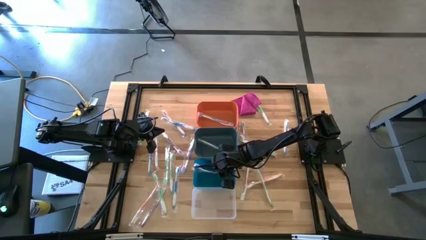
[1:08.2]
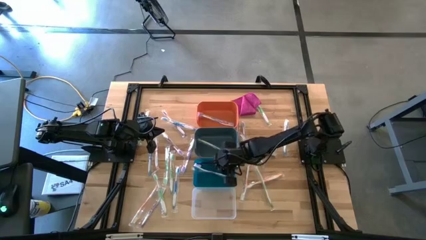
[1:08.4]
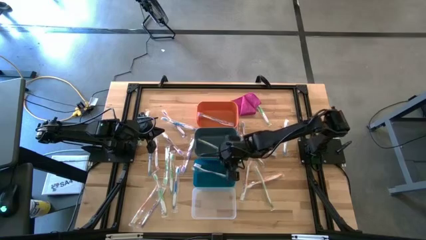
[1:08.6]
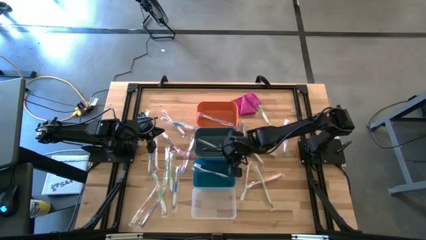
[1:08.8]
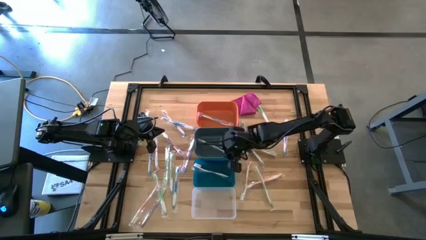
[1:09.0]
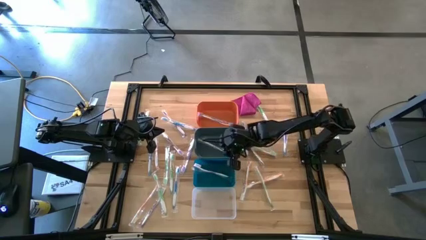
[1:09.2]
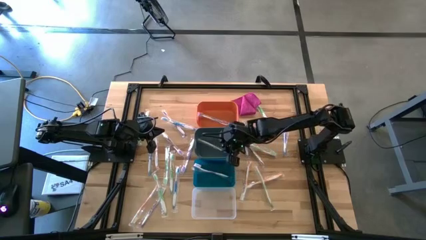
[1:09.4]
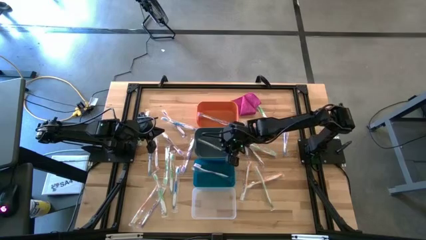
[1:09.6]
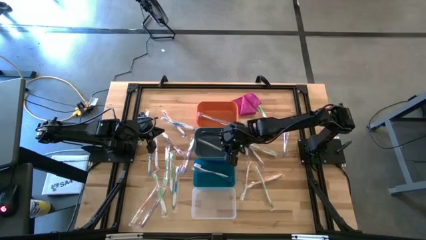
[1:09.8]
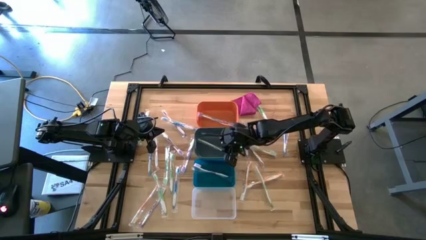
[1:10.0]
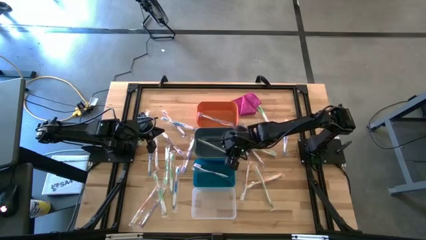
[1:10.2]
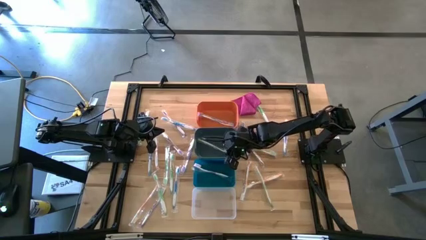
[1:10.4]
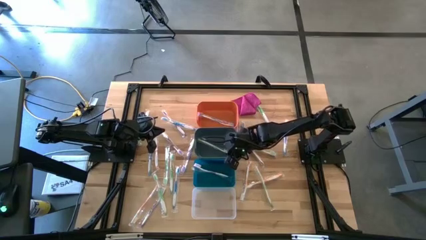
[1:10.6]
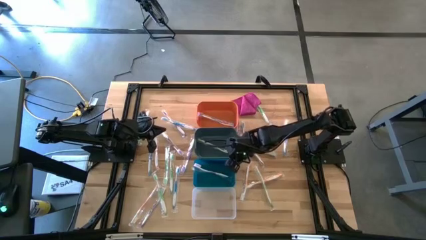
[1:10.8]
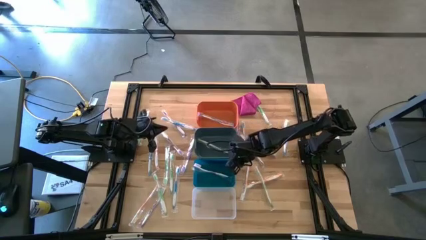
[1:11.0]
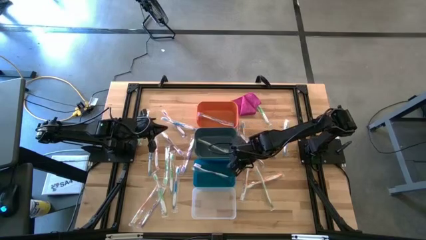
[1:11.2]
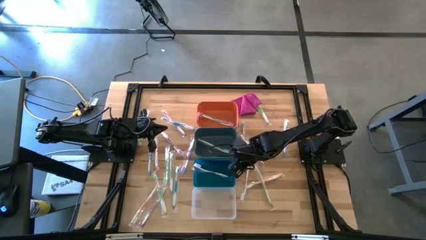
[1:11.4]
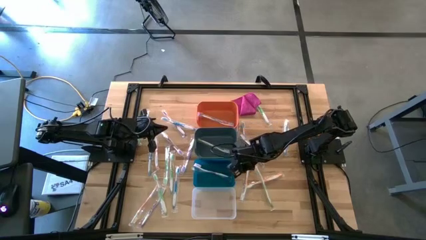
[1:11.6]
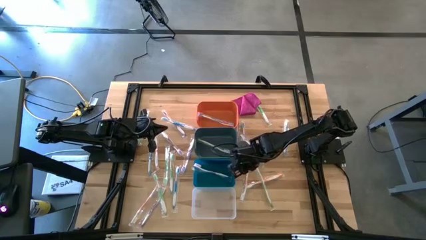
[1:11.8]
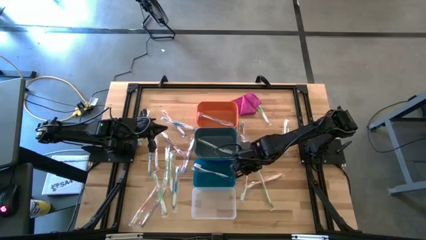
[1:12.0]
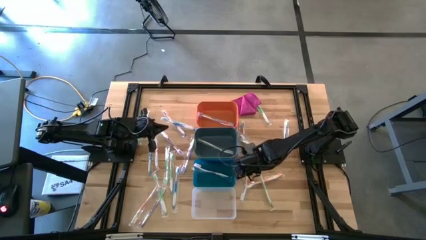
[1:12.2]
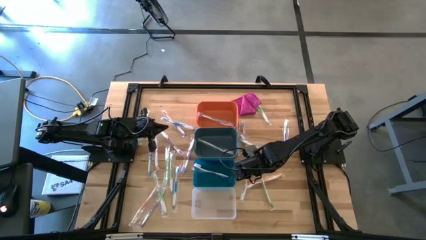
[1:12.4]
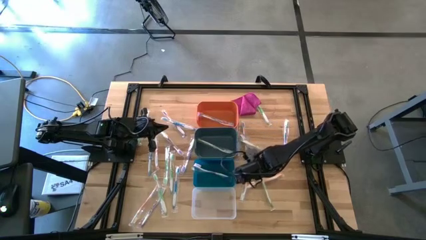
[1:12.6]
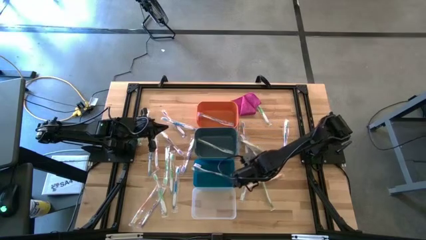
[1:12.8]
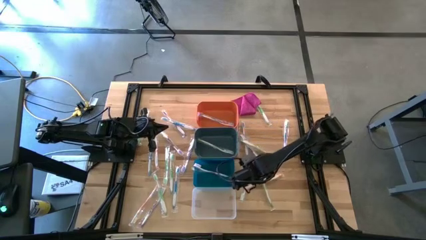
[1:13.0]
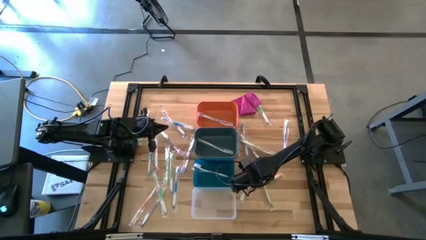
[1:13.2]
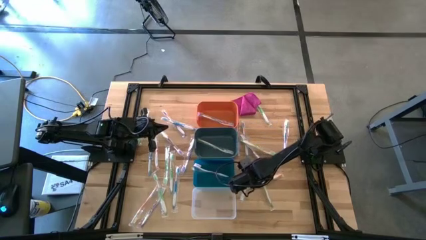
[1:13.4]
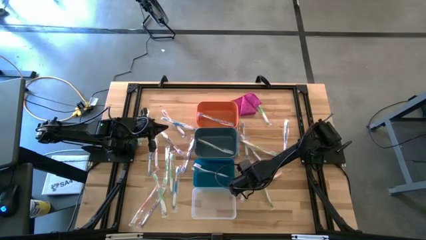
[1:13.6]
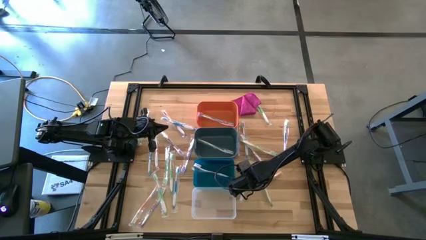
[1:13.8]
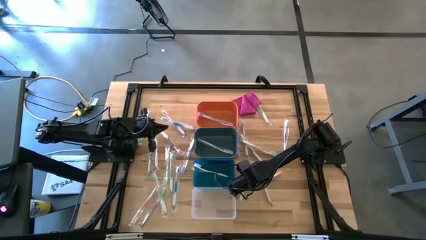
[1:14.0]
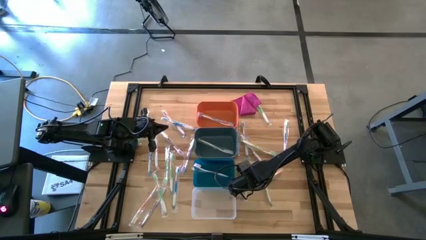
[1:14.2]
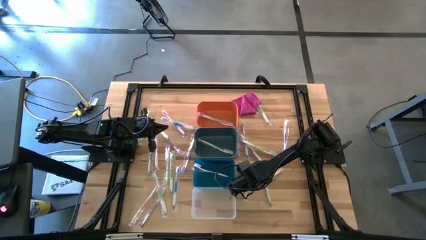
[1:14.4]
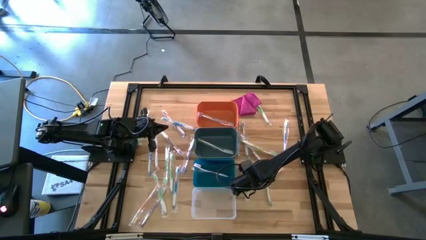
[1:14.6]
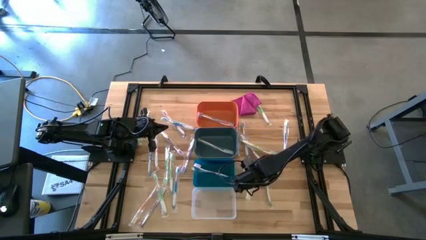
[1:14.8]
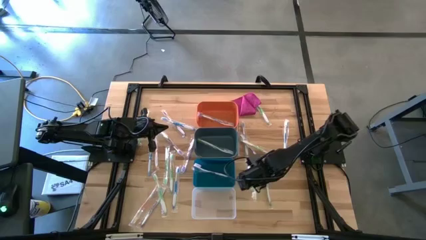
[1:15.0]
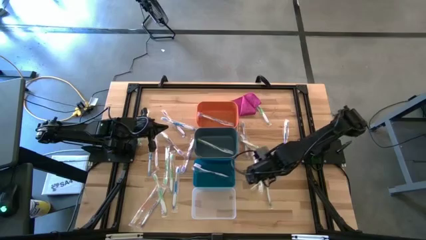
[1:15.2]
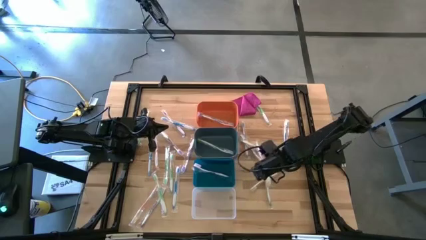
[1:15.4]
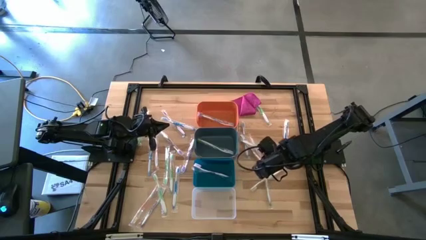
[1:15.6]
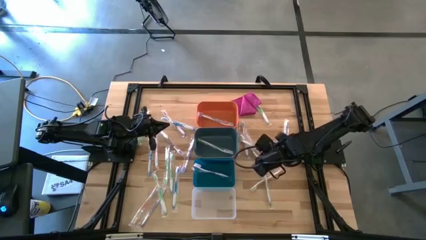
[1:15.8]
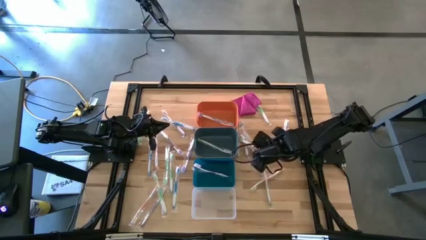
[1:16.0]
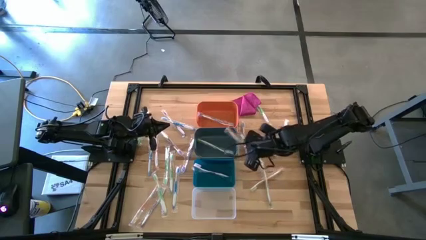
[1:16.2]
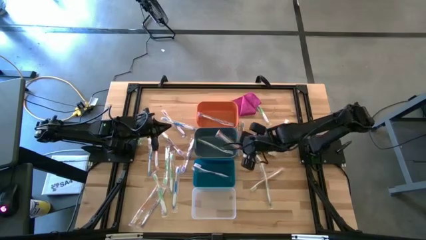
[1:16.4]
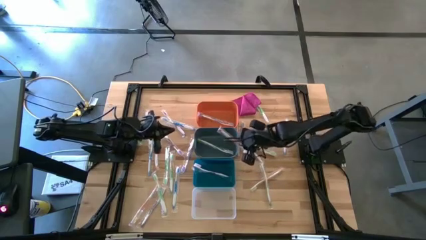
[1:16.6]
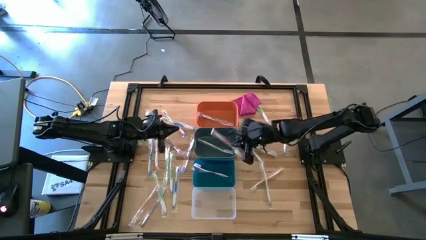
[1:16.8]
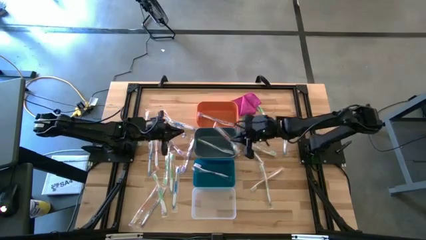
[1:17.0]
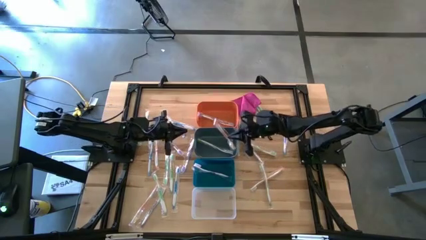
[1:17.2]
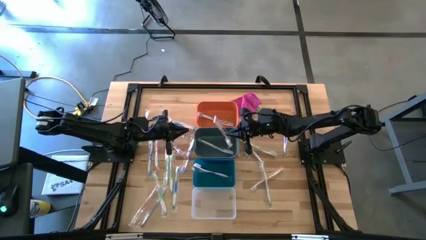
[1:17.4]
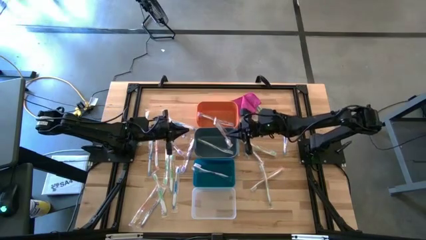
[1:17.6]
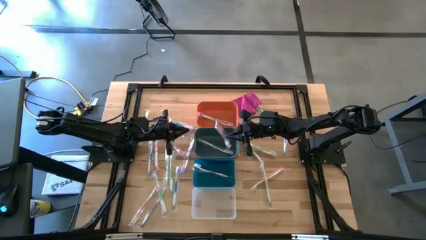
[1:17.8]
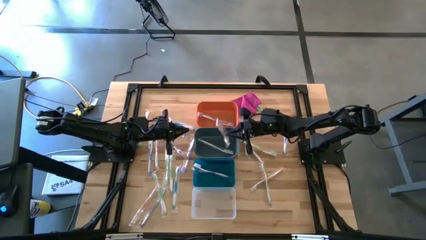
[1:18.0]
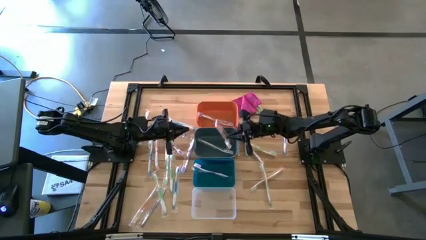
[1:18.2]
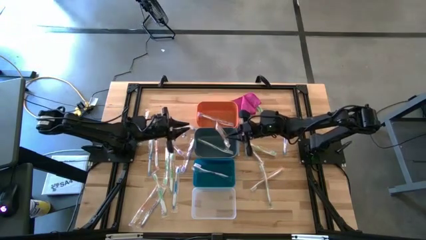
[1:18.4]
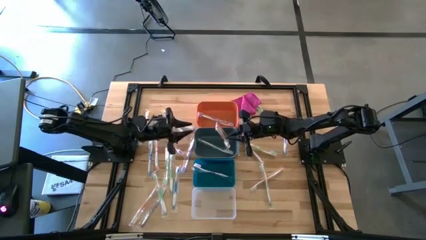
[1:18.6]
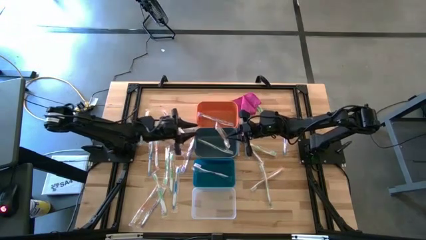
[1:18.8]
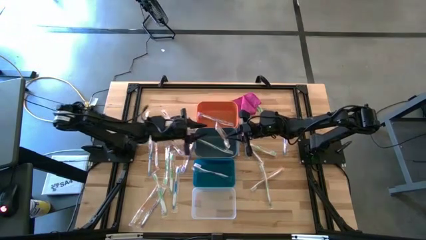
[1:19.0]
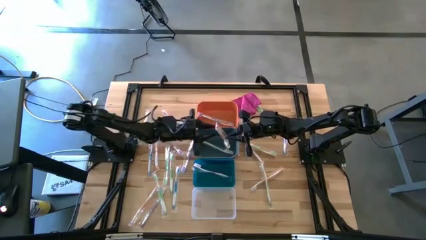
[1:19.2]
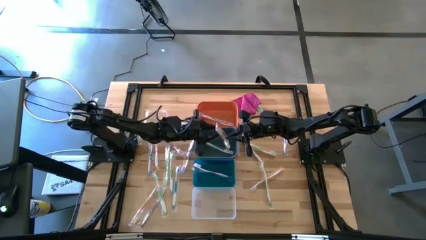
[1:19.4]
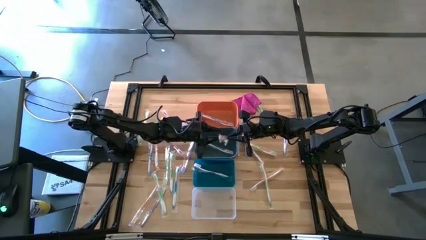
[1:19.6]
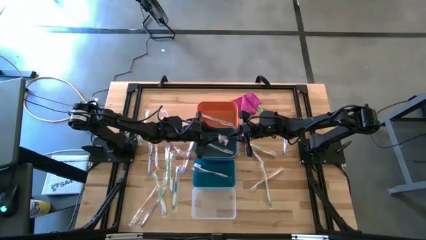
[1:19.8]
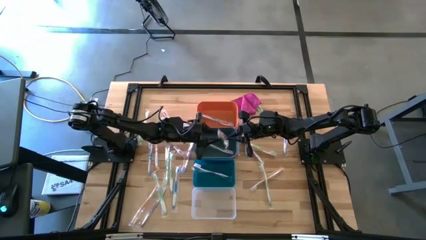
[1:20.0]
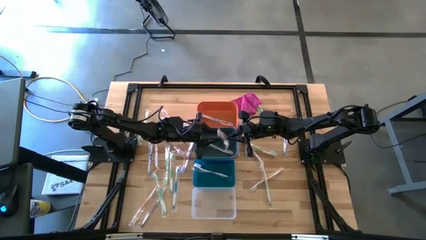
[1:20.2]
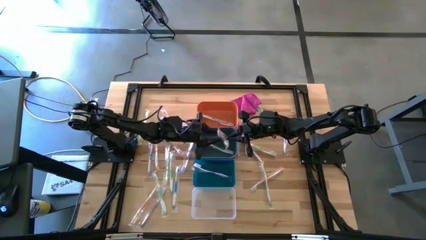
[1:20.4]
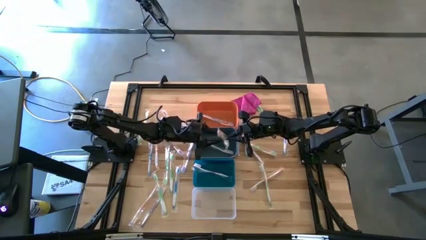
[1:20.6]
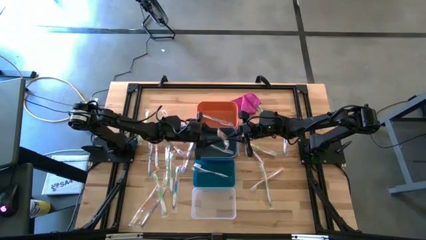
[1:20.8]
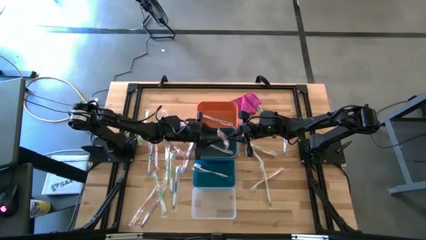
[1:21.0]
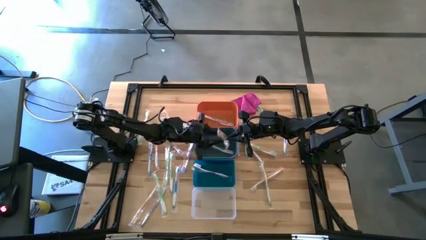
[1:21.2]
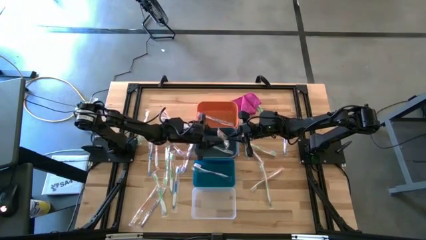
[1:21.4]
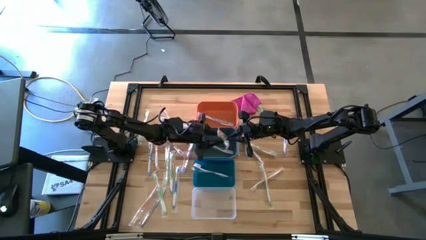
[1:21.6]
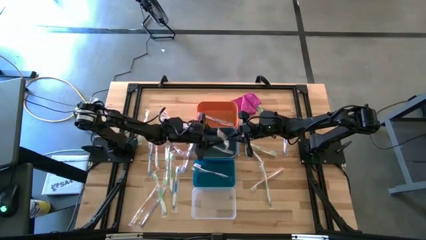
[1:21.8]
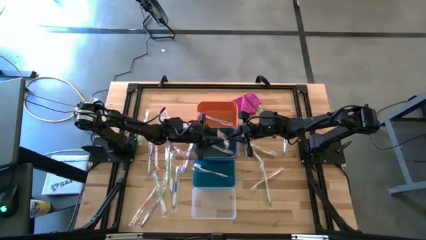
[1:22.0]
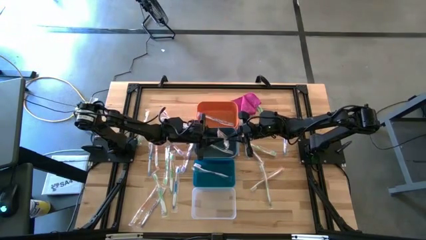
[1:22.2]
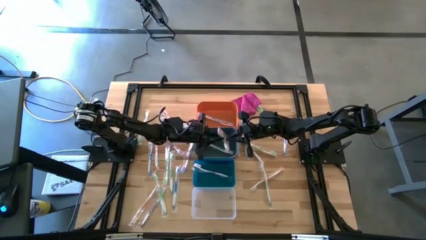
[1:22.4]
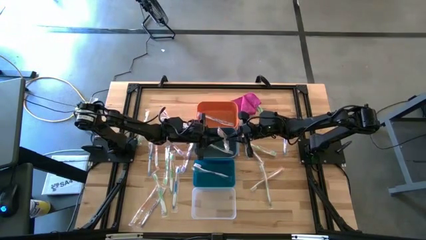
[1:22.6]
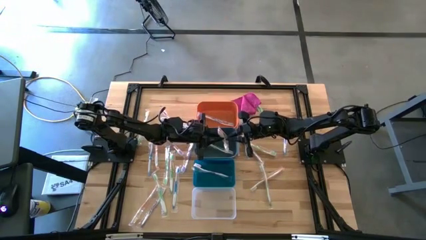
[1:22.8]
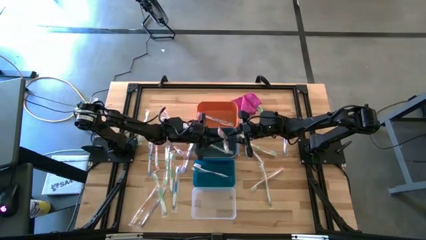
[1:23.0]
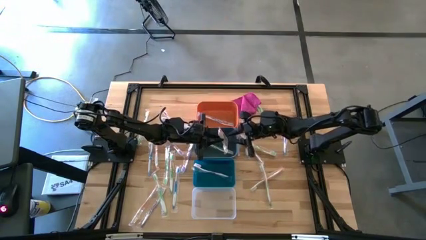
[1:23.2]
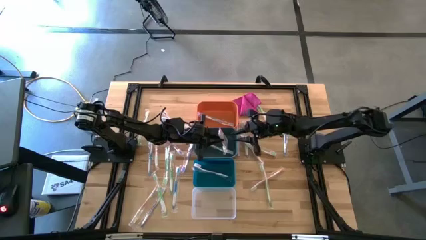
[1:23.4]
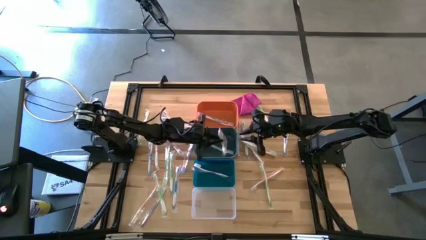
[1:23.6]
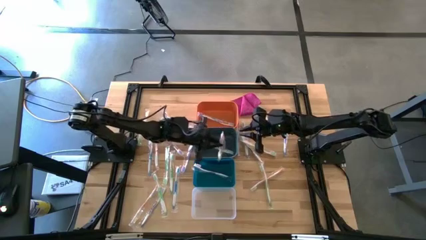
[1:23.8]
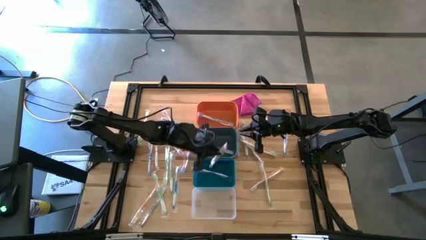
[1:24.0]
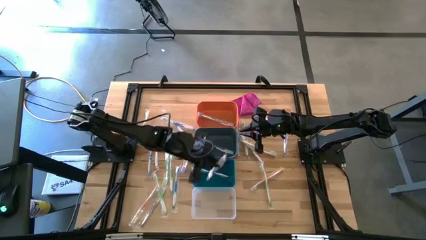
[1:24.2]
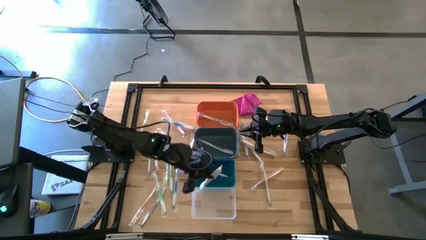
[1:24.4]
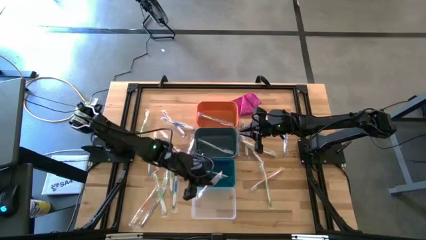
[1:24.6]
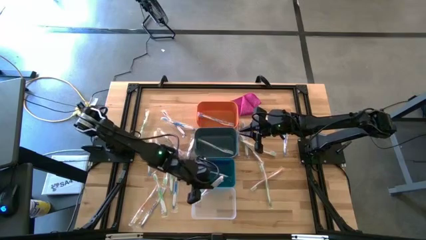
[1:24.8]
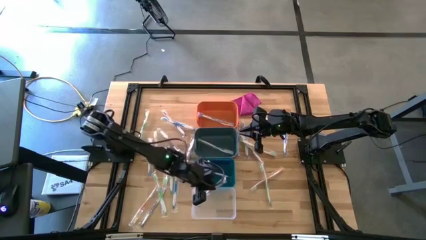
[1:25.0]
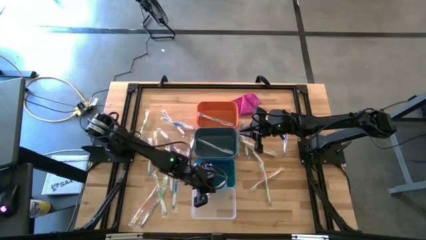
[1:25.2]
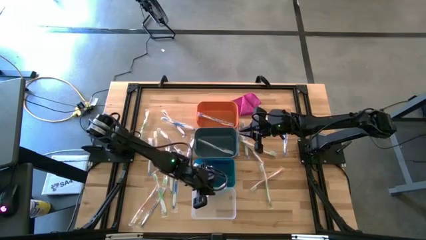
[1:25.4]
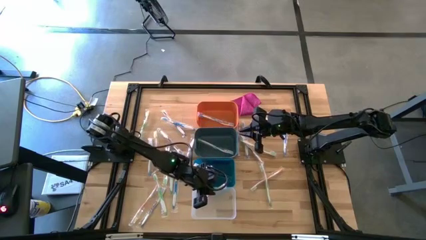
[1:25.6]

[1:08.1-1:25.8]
Task: Pick & Place Toothbrushes
Put the orange toothbrush into the transparent bin
